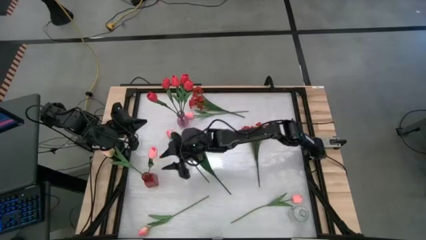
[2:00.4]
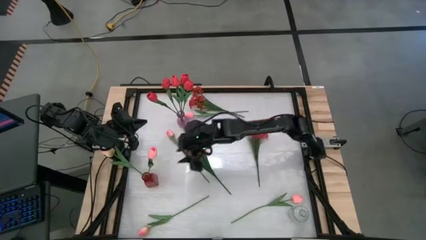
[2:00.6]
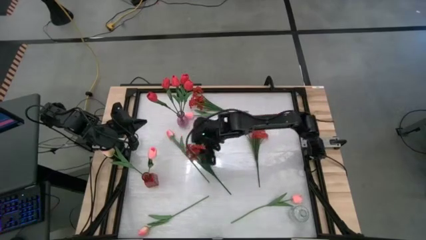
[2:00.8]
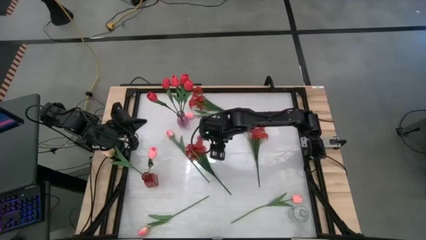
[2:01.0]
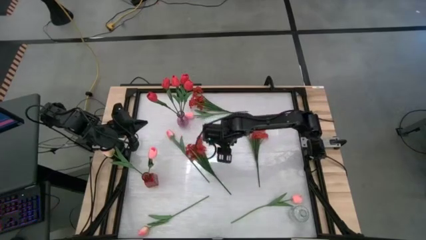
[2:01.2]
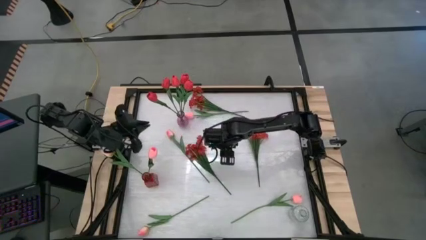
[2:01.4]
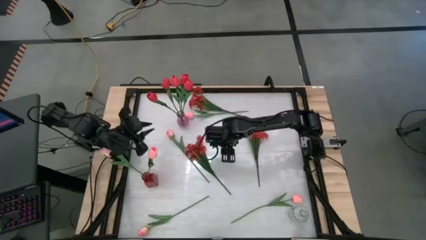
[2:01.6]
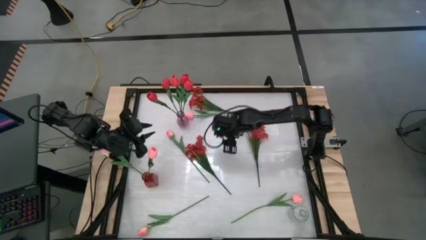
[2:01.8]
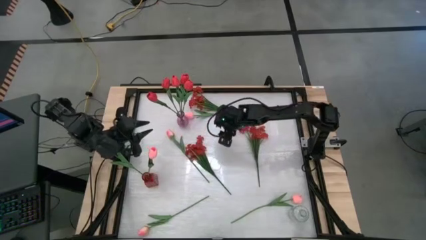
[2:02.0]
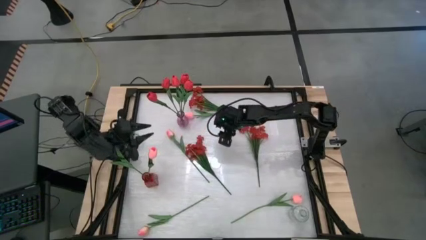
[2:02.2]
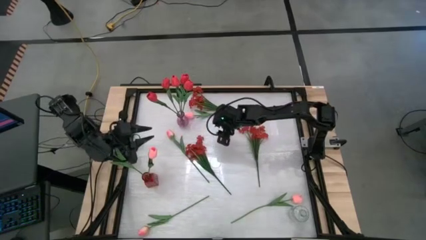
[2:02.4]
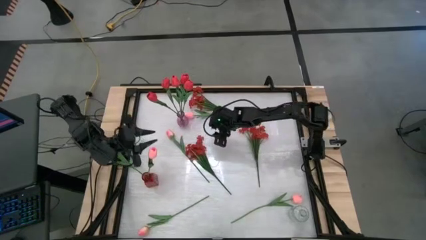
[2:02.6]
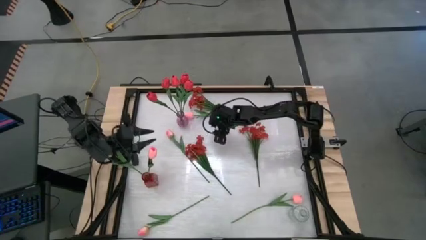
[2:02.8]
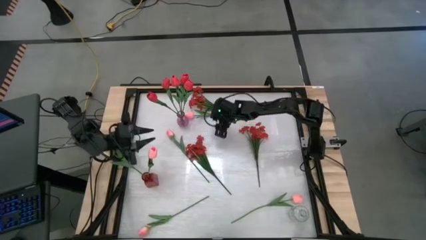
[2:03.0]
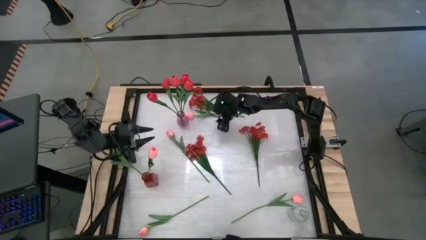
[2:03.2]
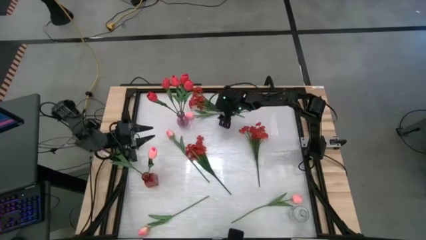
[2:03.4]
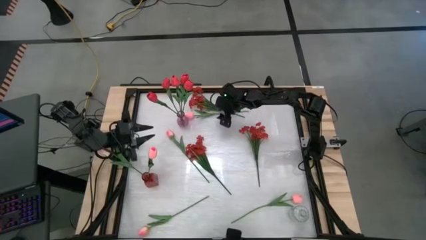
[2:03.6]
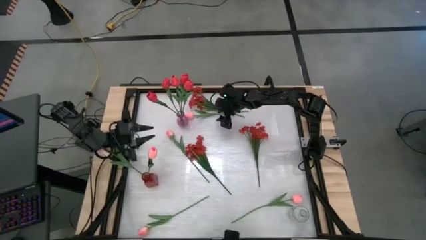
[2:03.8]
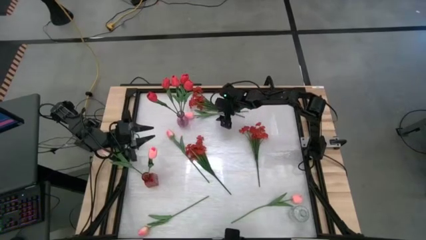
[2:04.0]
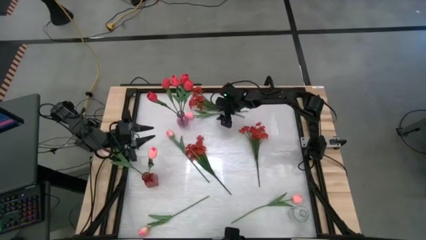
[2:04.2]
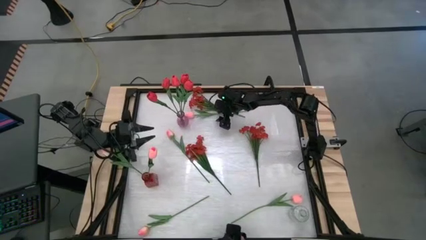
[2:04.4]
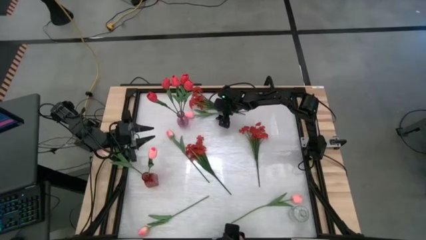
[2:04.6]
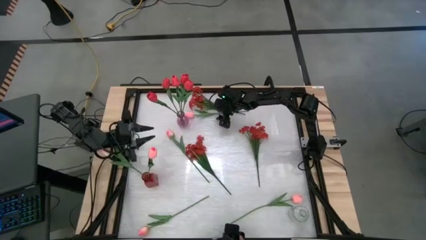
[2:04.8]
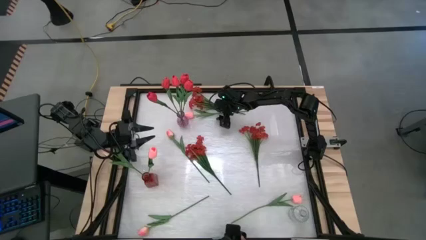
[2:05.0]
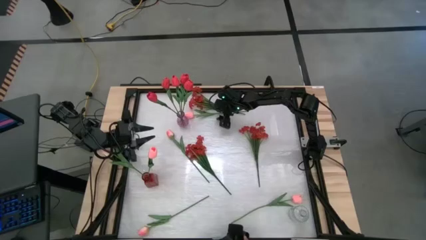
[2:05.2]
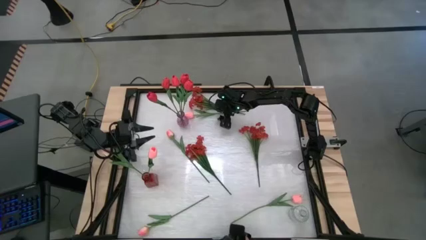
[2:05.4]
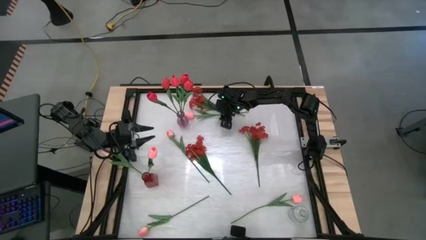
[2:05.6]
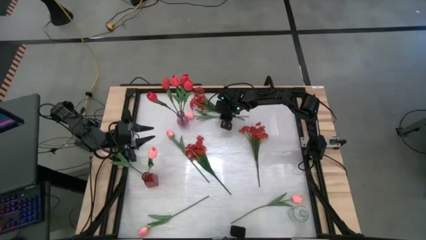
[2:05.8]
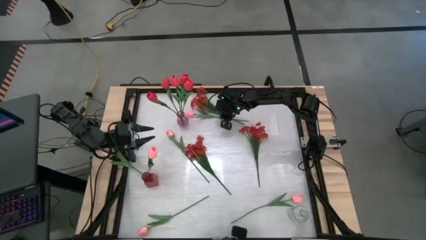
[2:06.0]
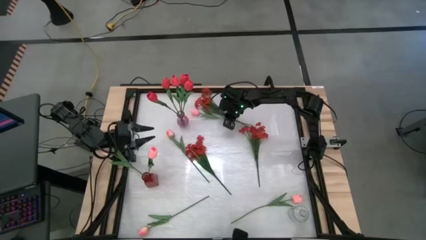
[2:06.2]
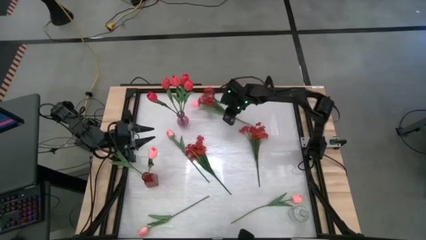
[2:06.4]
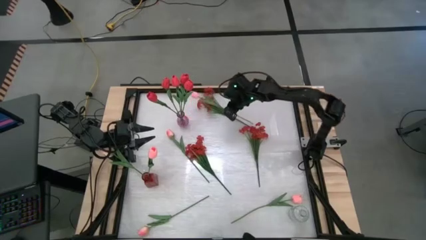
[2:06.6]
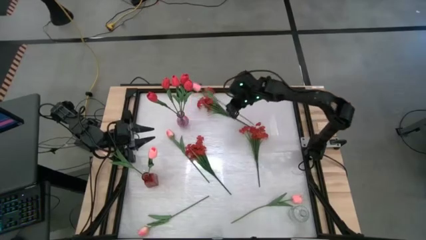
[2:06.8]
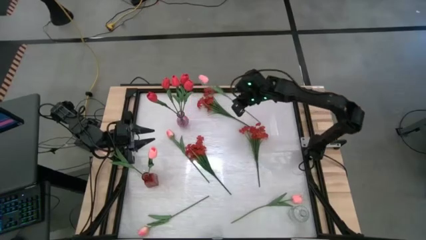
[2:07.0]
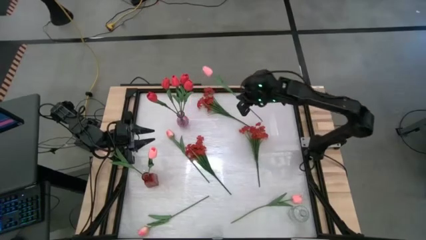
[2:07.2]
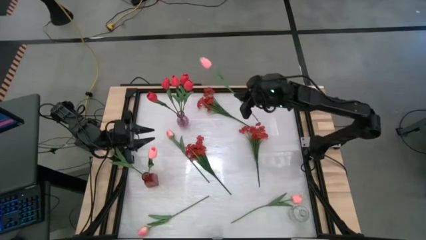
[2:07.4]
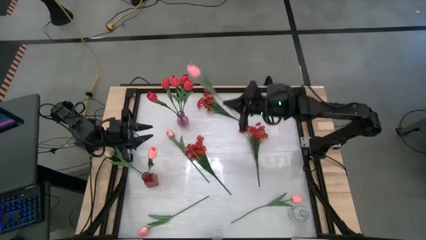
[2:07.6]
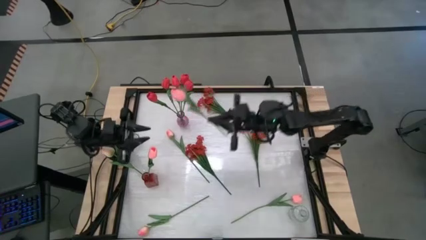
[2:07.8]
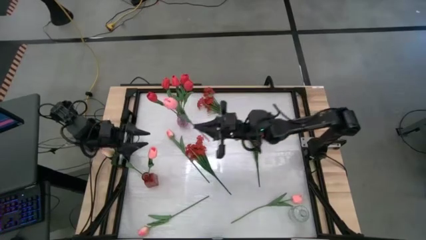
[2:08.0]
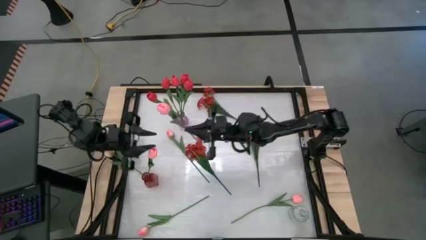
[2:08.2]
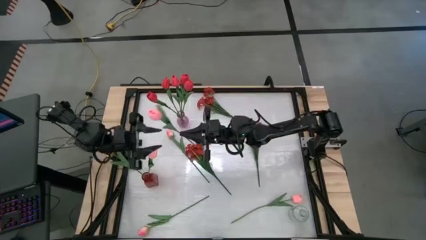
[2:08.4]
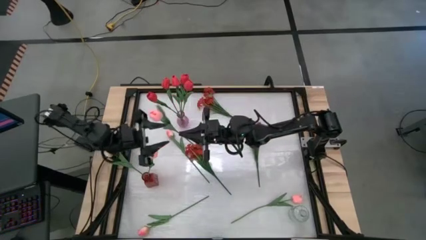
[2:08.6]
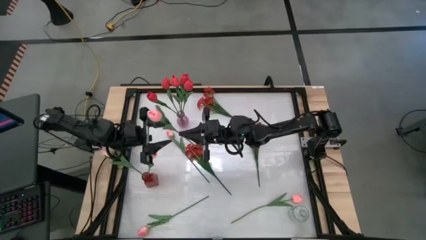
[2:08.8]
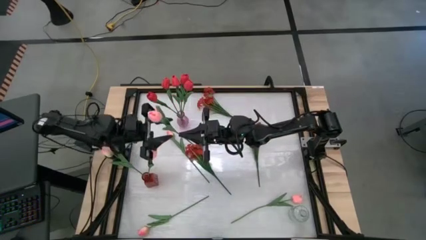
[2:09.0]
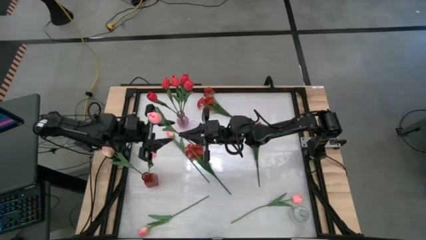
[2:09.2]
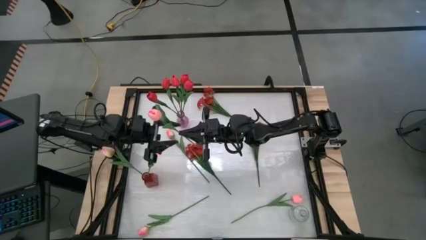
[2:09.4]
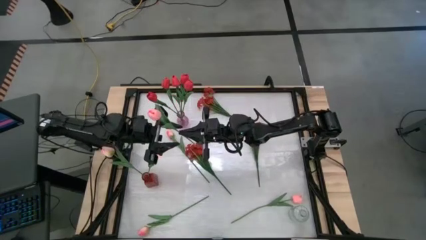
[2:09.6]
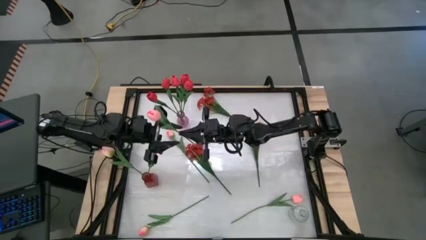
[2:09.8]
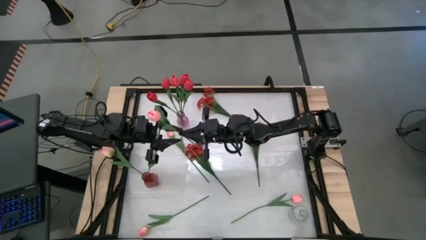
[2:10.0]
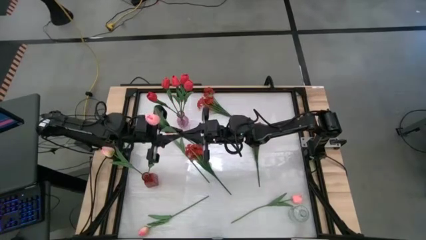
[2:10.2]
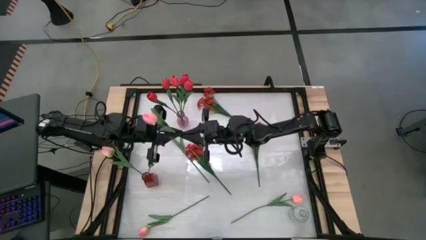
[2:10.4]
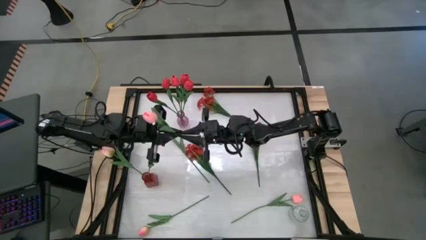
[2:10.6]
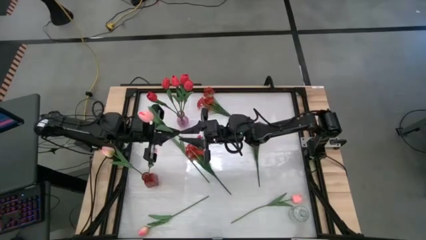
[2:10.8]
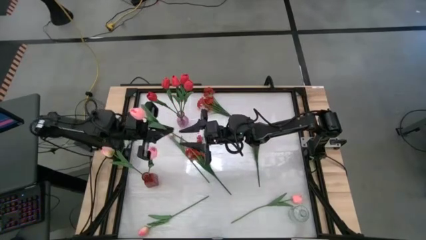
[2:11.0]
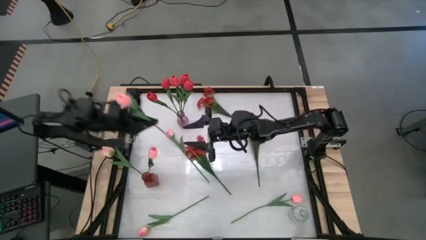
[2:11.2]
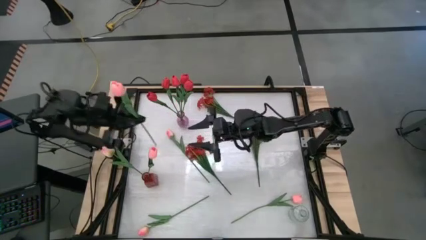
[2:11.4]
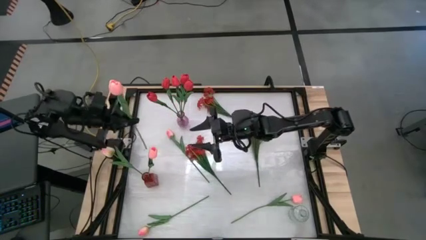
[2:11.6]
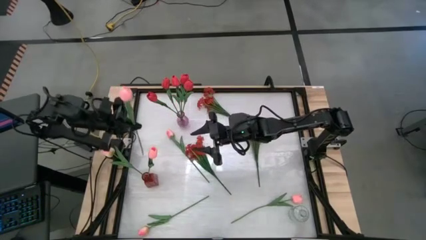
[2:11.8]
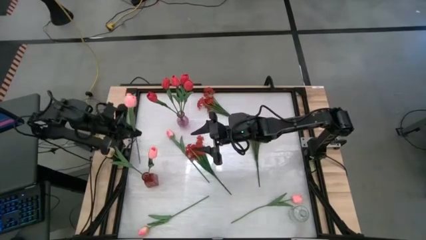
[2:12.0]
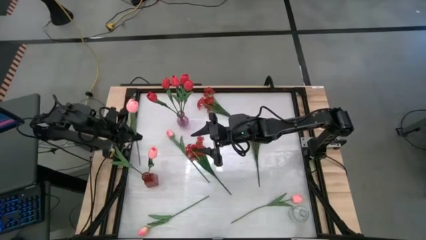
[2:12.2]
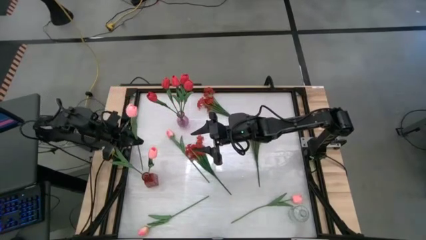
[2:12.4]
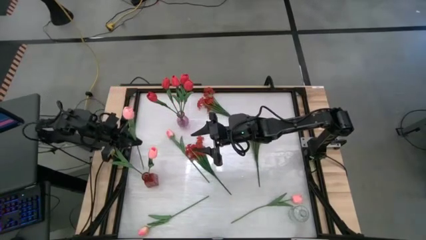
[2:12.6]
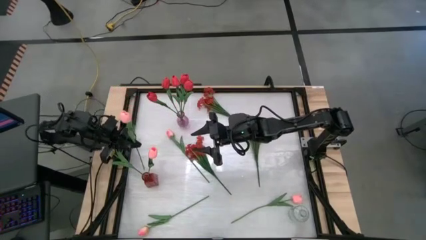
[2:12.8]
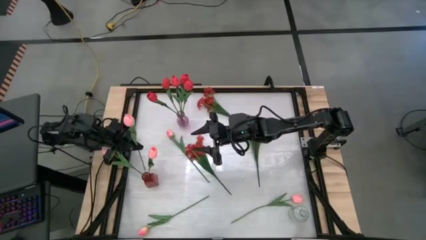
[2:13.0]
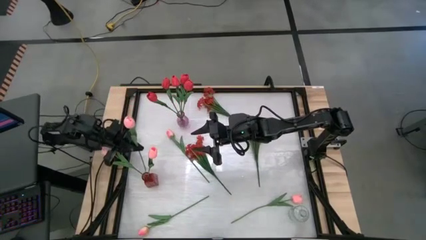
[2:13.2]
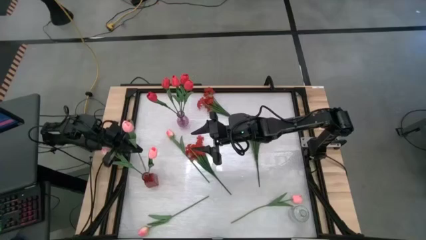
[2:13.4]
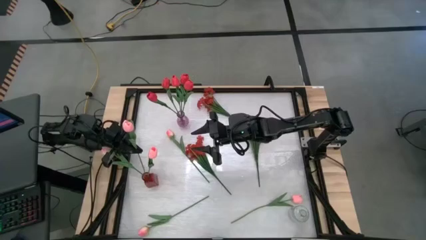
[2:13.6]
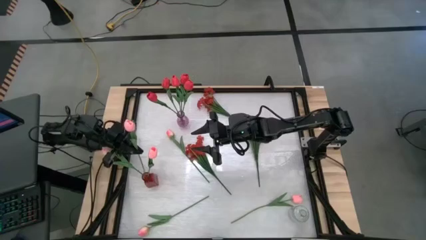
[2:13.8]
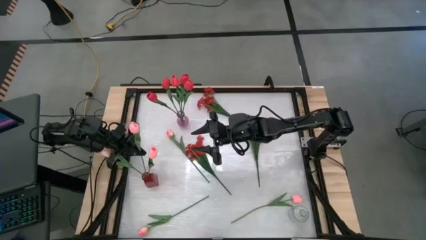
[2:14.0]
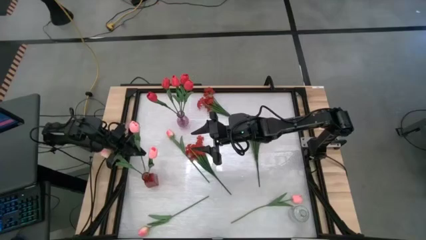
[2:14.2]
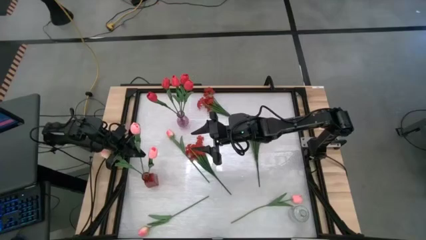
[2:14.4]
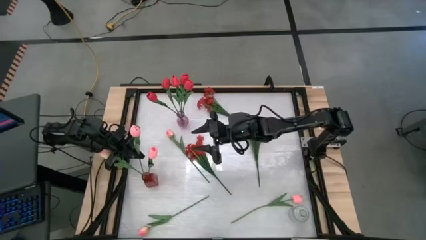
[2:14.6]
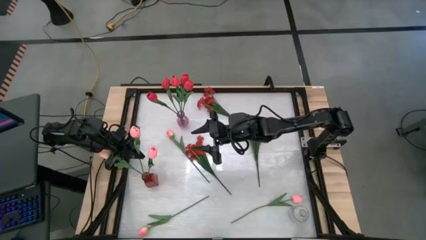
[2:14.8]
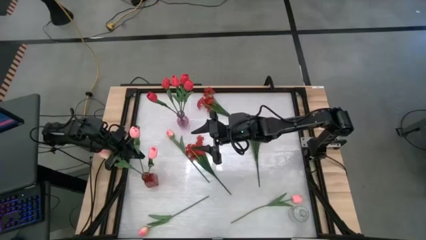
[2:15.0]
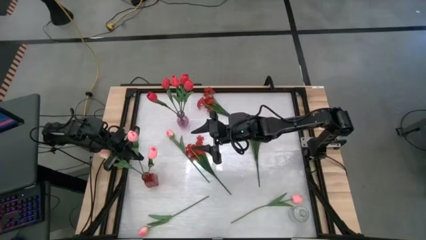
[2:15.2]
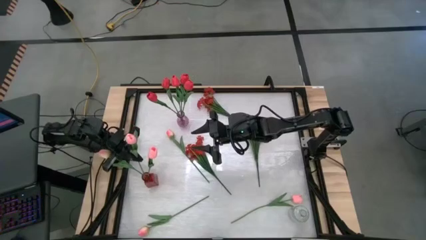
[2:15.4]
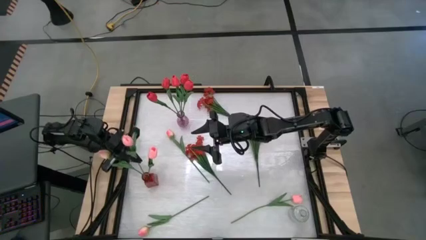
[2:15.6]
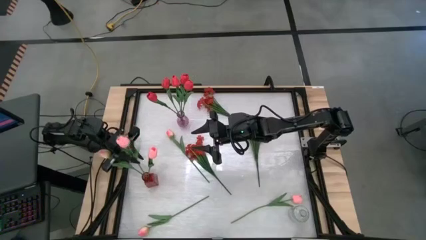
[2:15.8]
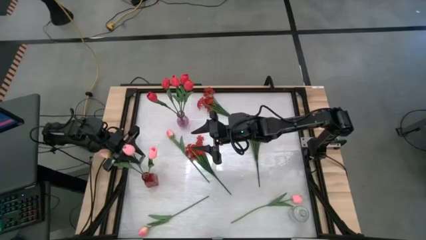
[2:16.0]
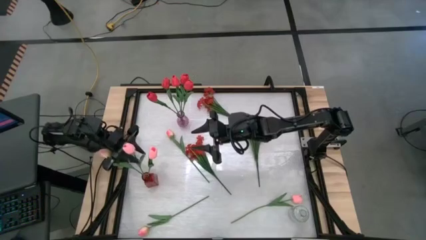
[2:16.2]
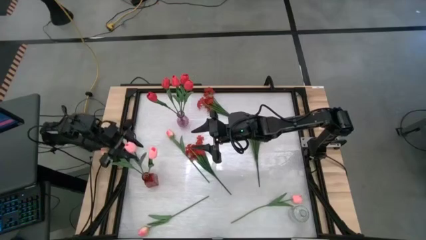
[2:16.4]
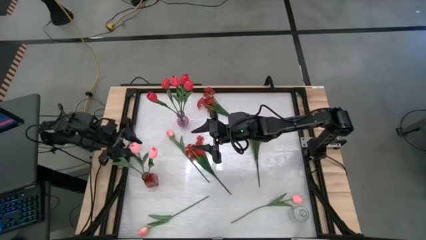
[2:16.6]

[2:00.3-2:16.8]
Task: Sort flowers into vase by color
Put the pink tulip into the red vase
